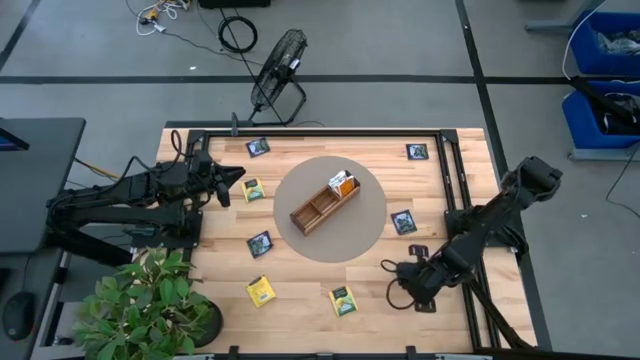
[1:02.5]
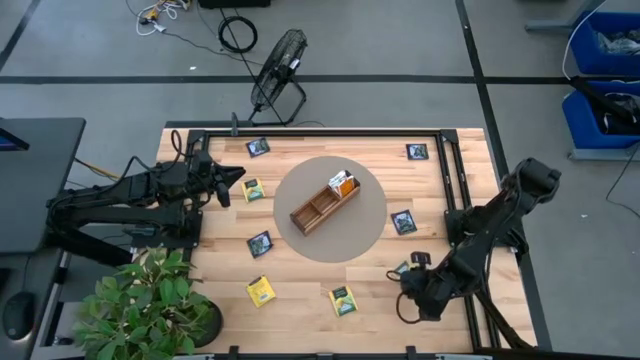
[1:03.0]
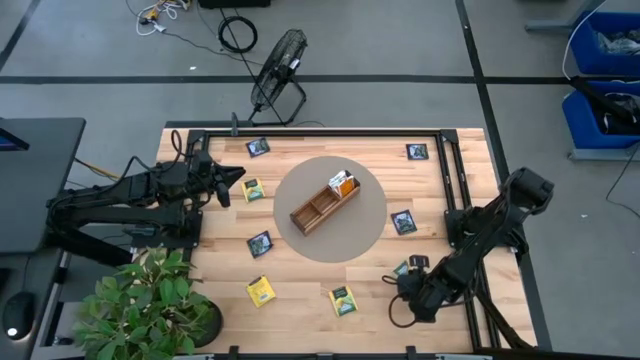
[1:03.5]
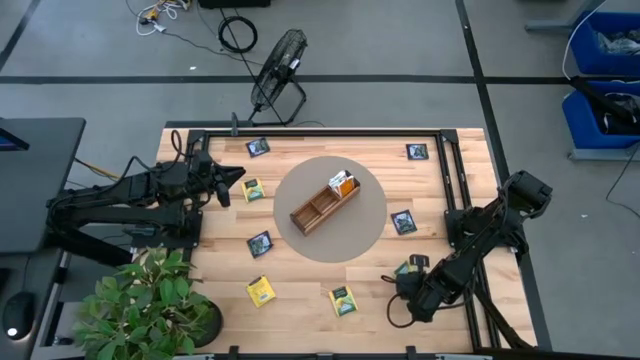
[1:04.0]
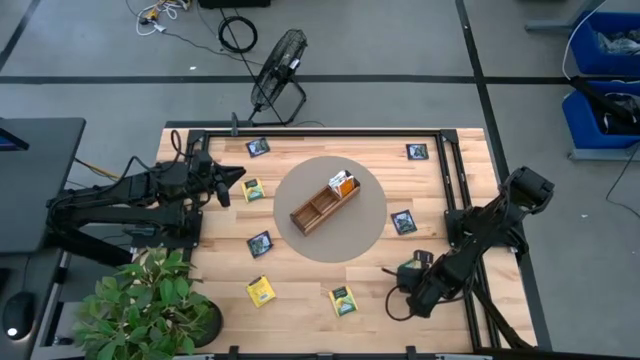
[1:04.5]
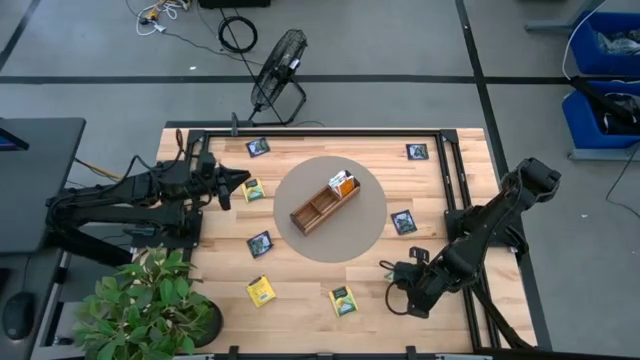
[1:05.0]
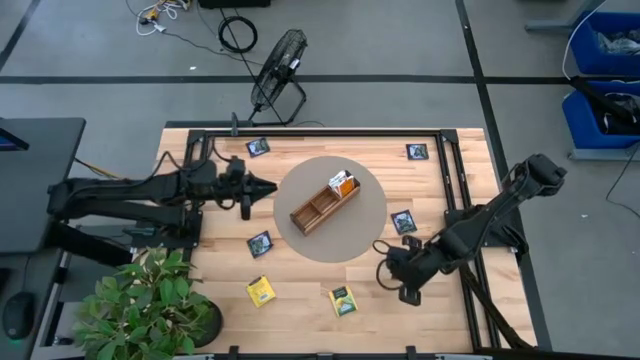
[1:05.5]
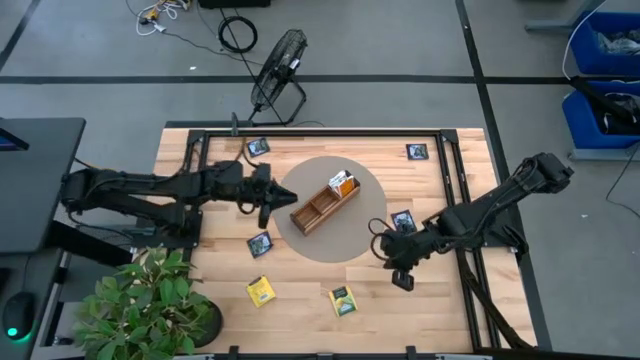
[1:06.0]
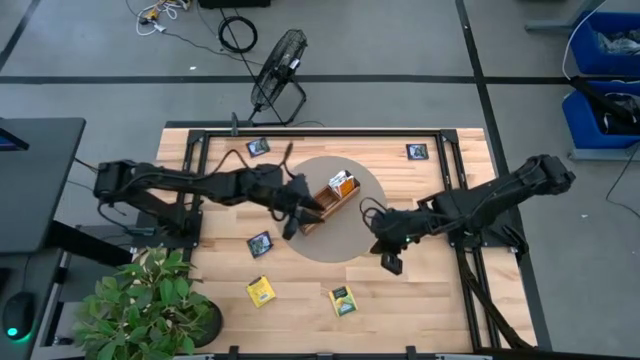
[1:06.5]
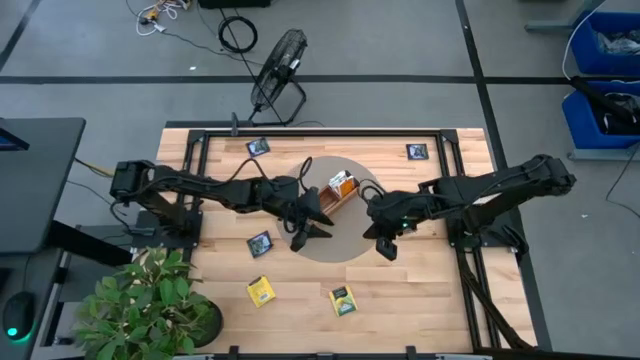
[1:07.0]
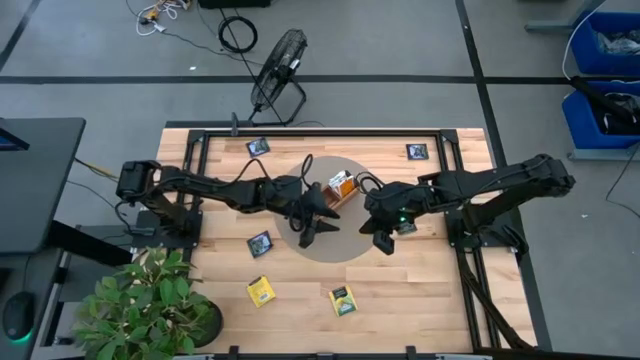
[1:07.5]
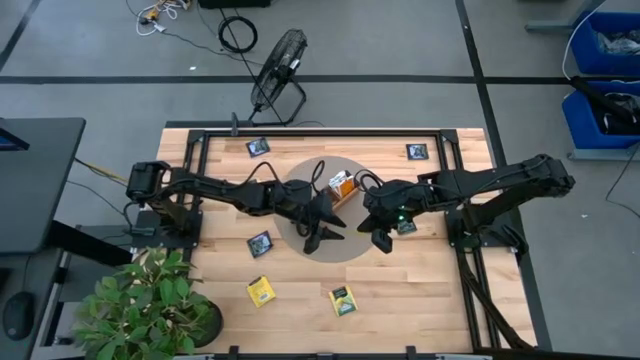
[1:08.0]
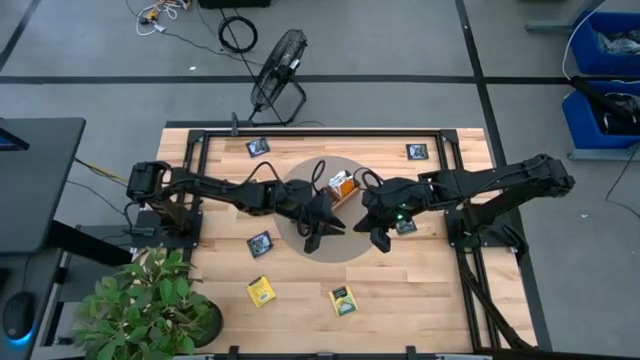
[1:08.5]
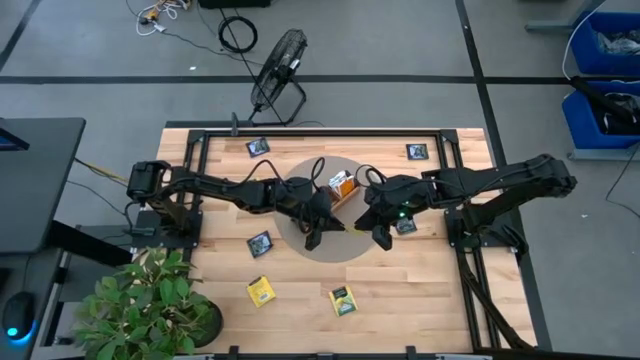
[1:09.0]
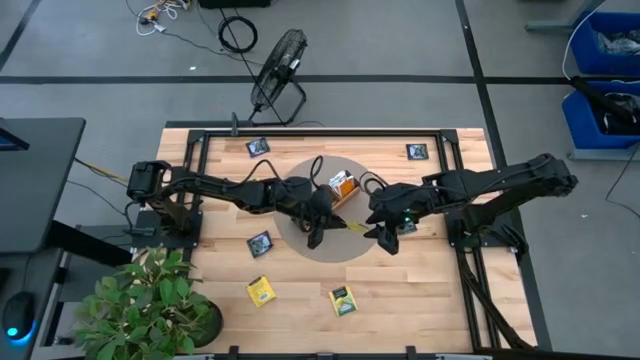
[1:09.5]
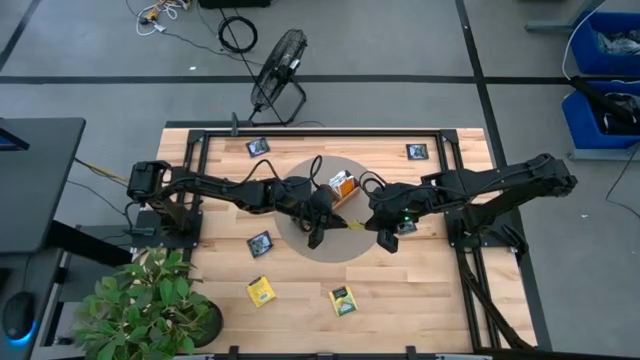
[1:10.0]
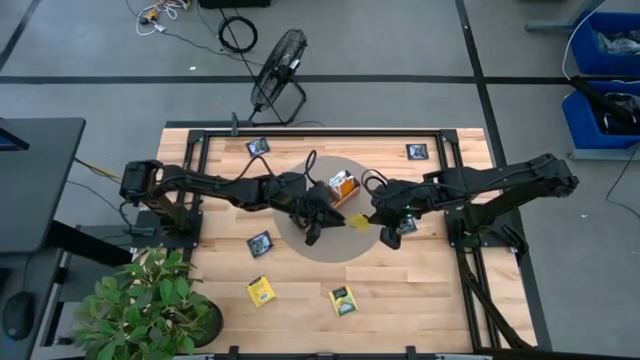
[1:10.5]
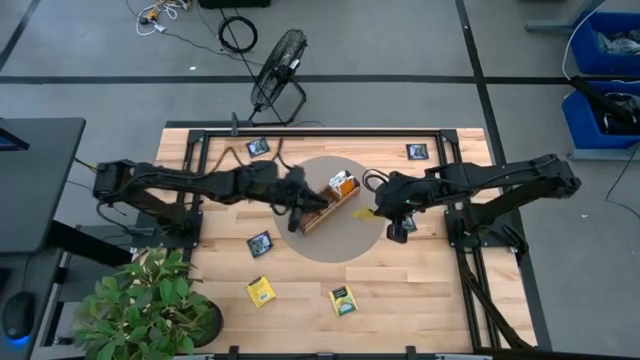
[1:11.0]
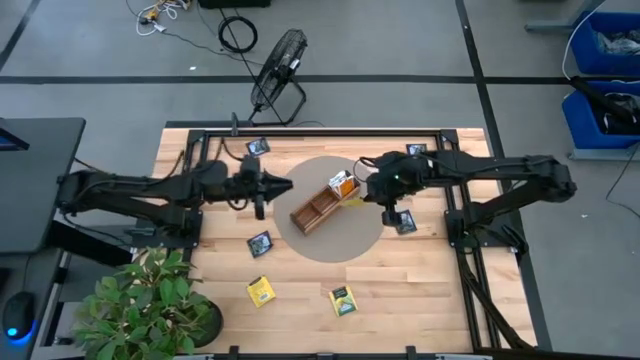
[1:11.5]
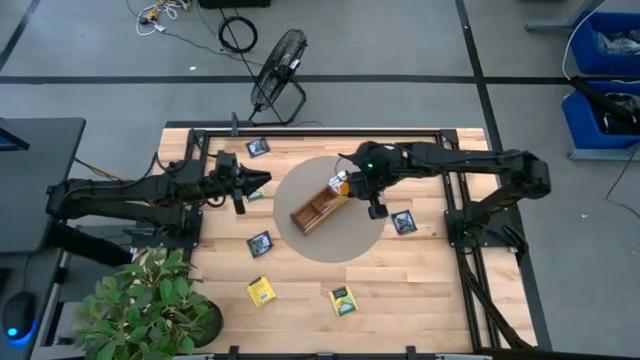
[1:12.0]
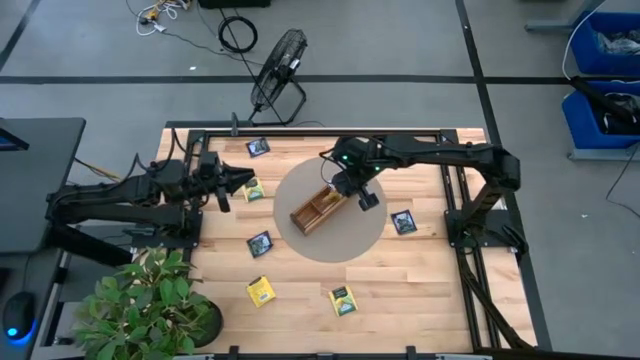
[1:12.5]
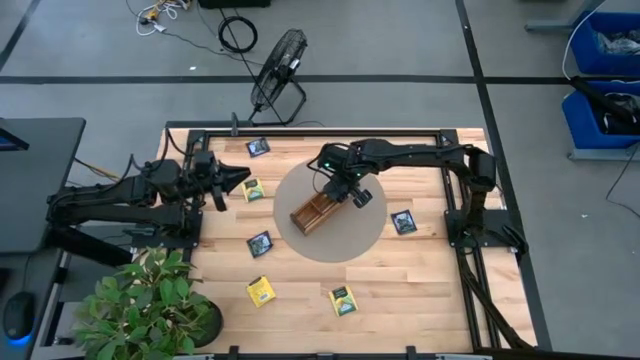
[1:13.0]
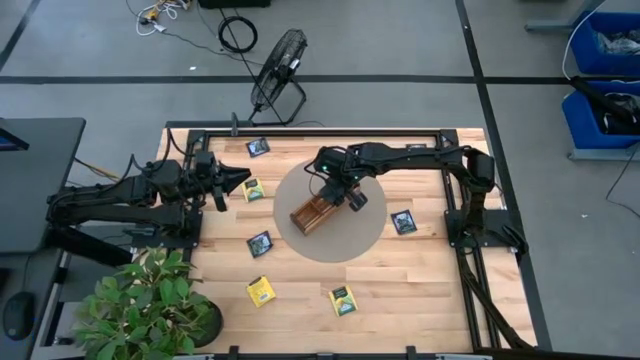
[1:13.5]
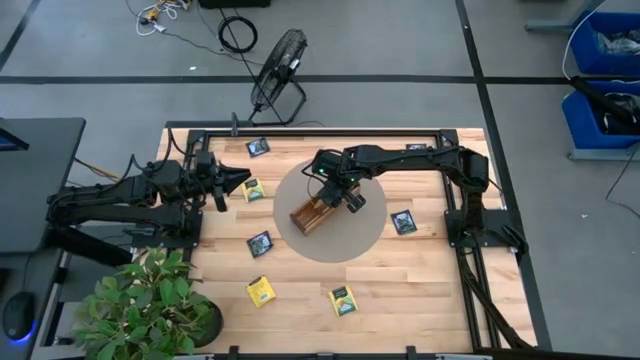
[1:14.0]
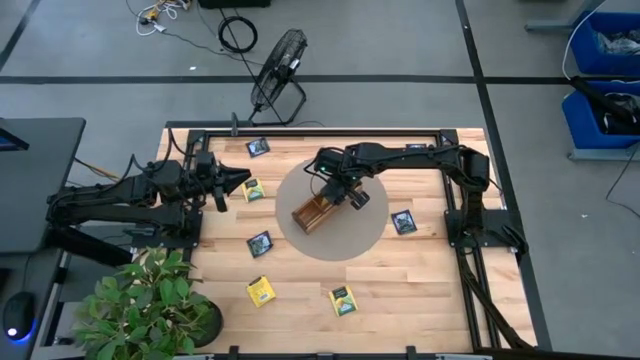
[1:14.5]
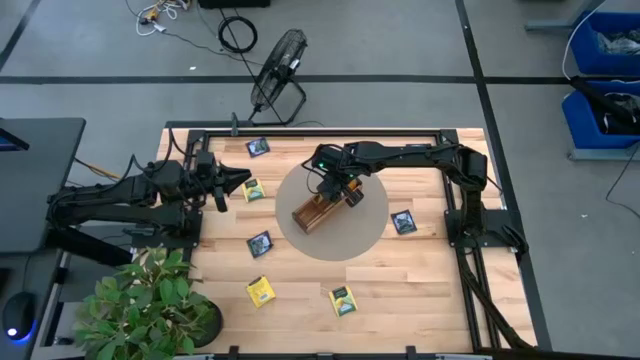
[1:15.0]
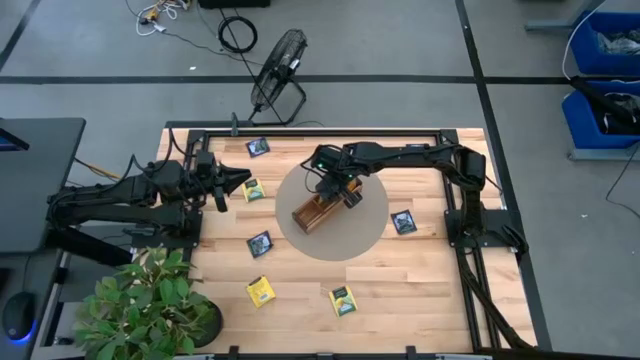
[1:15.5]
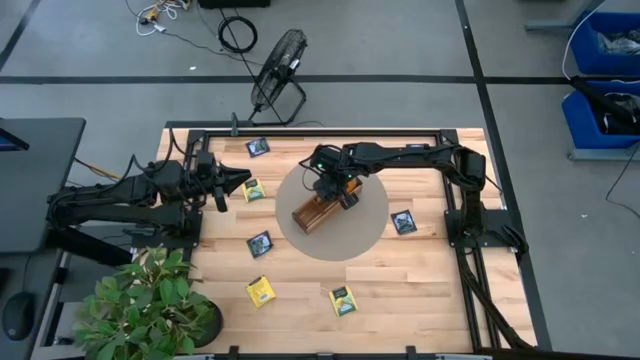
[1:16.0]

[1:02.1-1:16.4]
Task: Pick & Place Tea
Put the yellow tea bag into the middle section of the wooden organizer

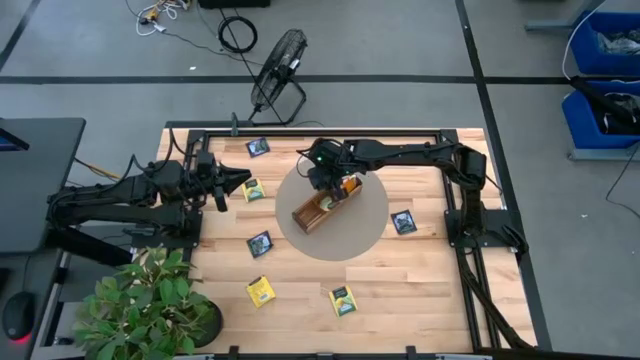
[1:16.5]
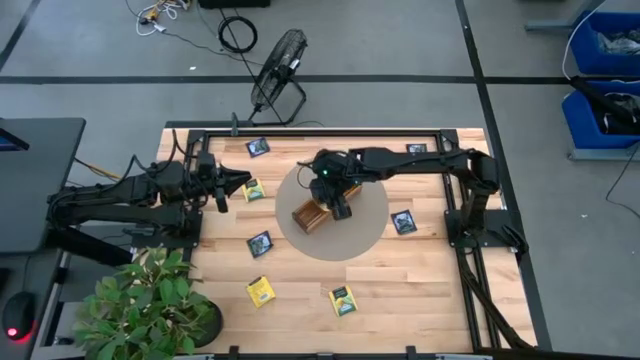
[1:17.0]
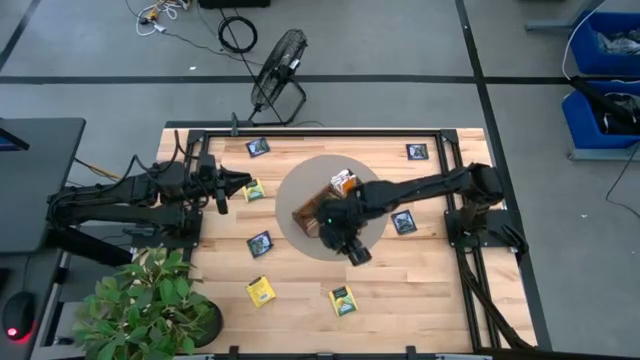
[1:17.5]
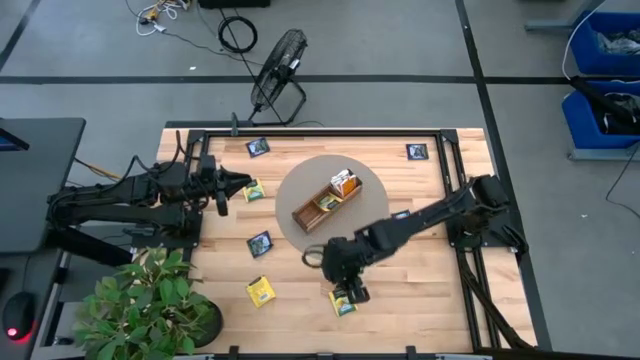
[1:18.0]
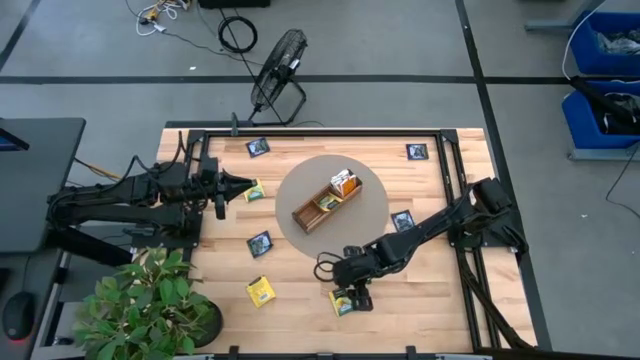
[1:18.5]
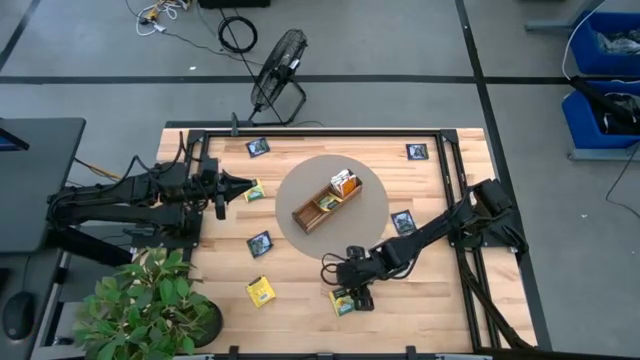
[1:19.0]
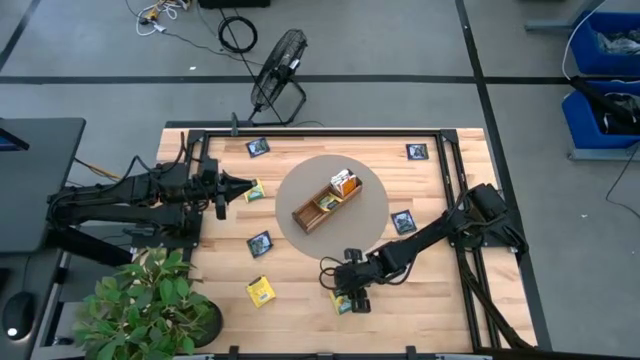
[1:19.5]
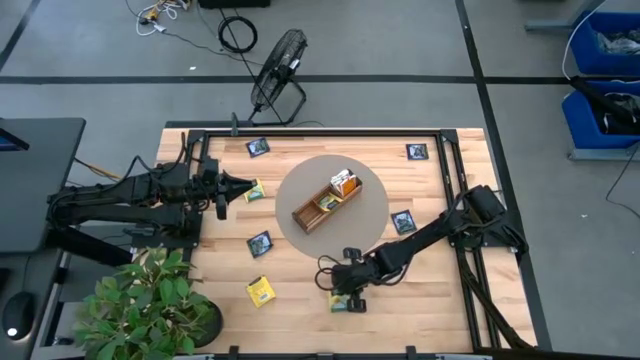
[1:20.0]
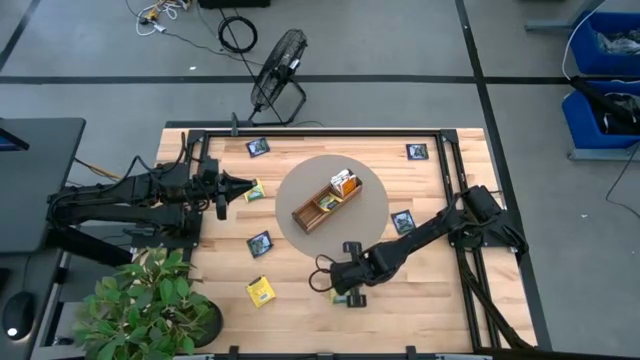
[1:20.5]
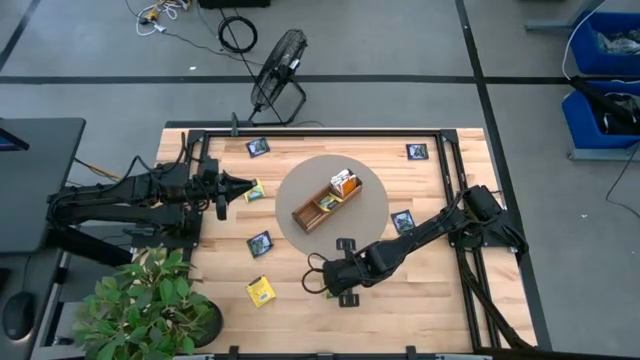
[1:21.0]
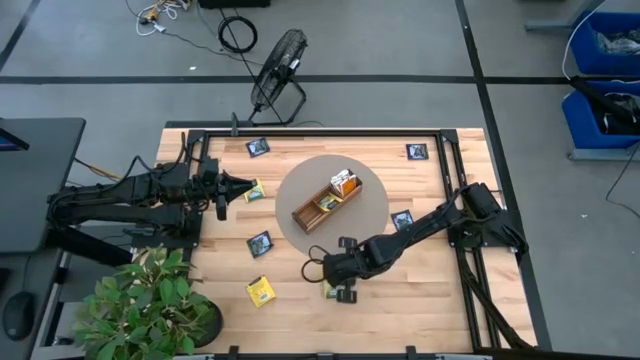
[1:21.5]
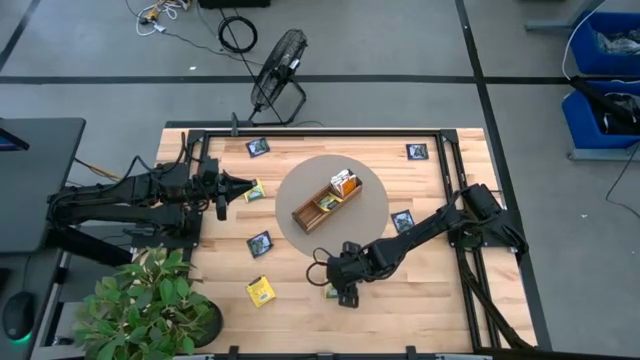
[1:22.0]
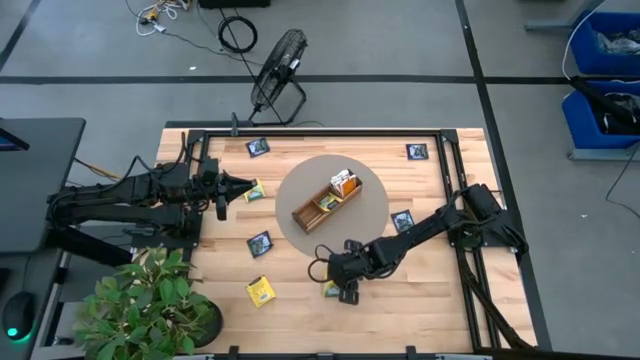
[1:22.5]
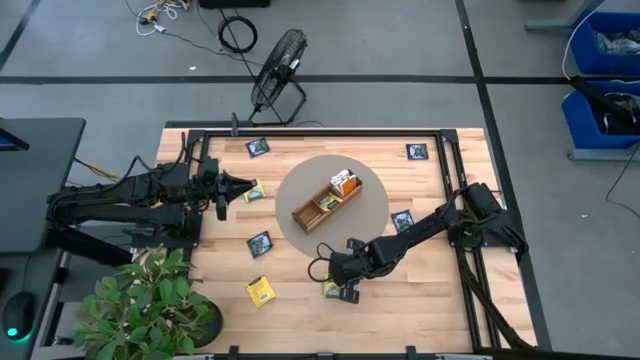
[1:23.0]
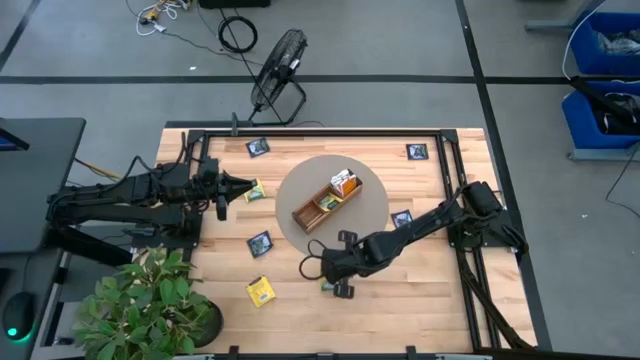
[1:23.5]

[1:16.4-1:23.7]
Put the yellow tea bag into the middle section of the wooden organizer

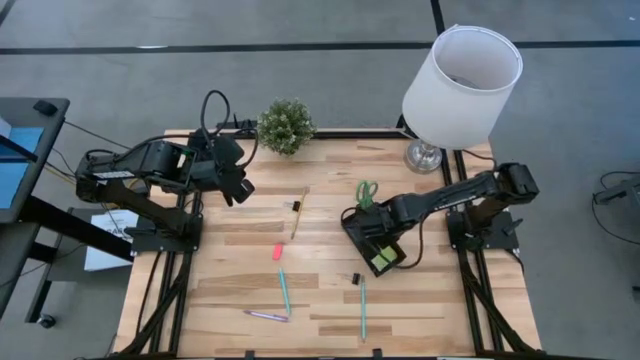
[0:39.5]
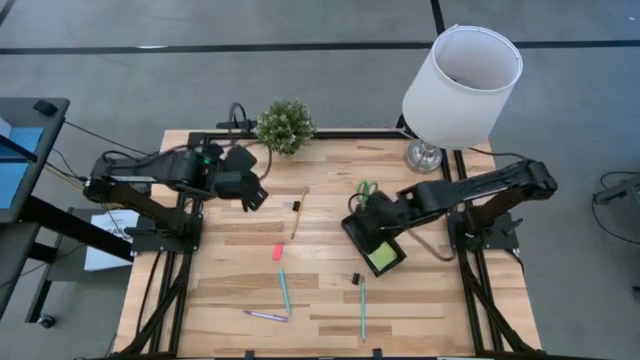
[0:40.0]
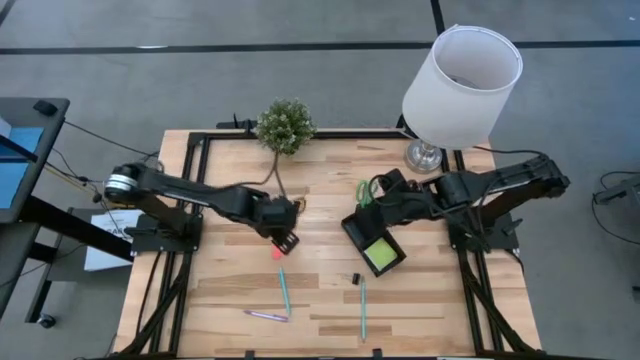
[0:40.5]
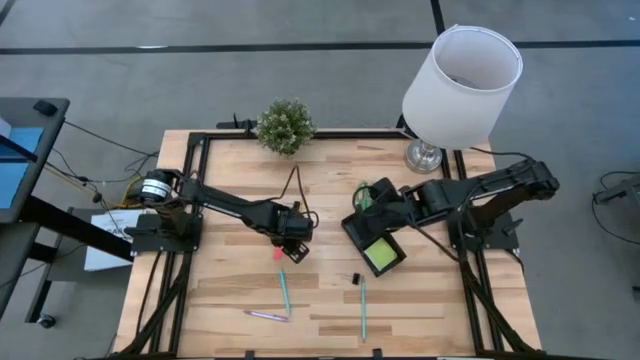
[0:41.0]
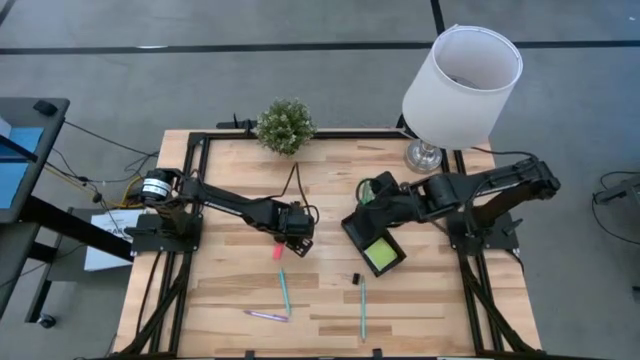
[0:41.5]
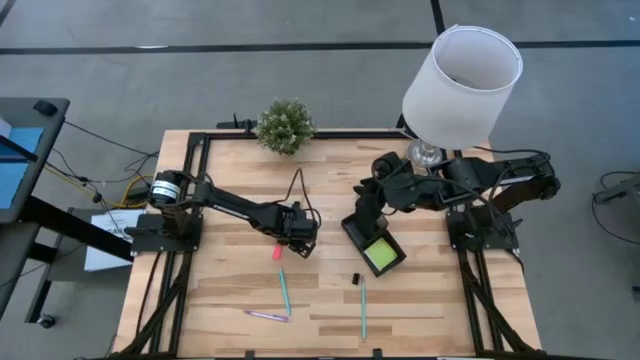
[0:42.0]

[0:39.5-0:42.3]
Task: Pick and place office supplies into organizer
Put the yellow pencil into the black desk organizer
